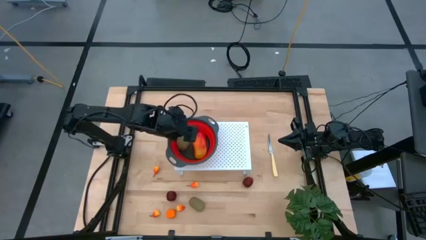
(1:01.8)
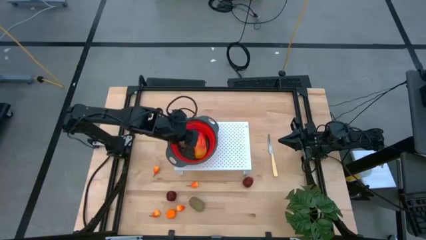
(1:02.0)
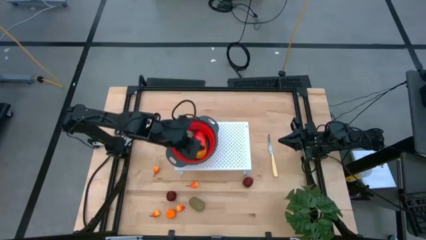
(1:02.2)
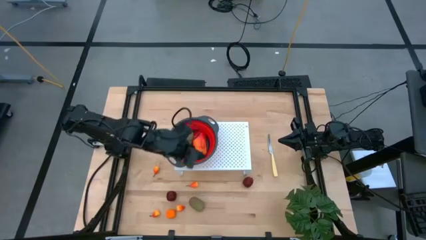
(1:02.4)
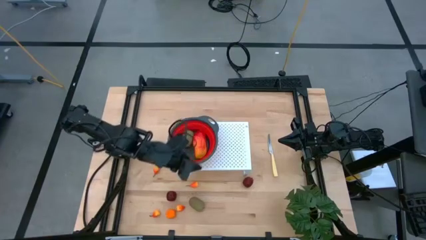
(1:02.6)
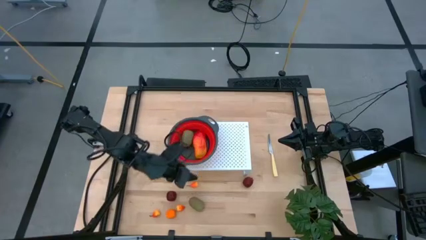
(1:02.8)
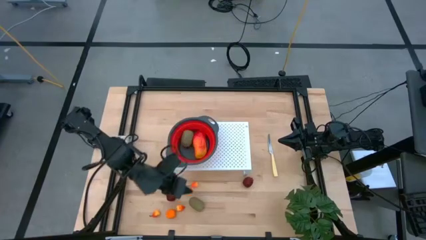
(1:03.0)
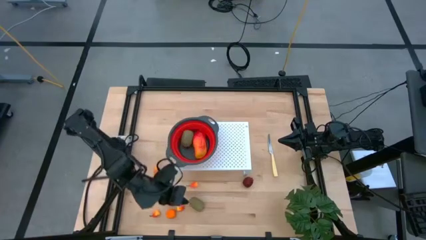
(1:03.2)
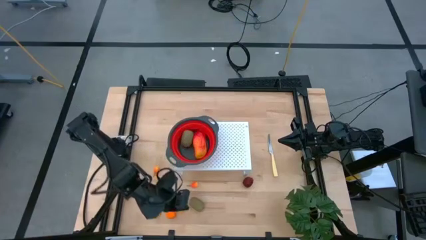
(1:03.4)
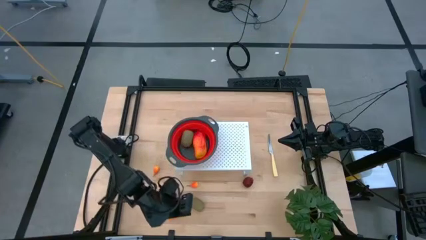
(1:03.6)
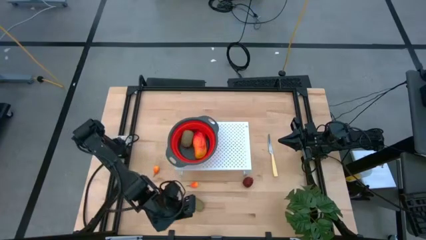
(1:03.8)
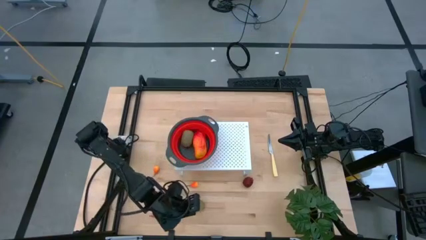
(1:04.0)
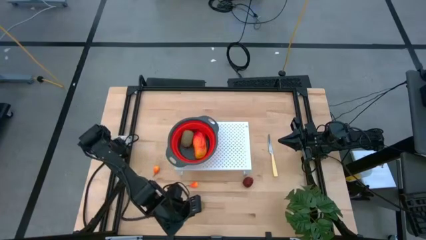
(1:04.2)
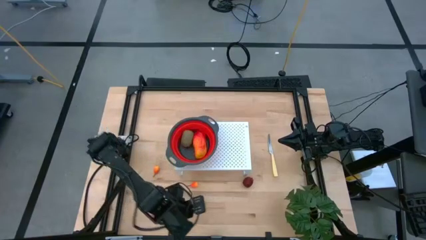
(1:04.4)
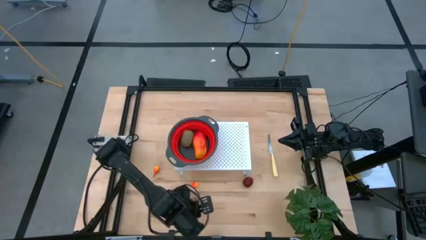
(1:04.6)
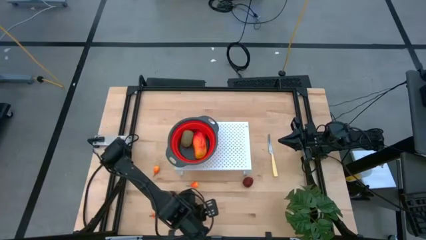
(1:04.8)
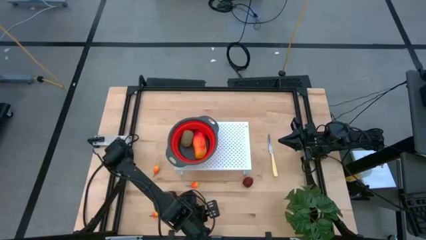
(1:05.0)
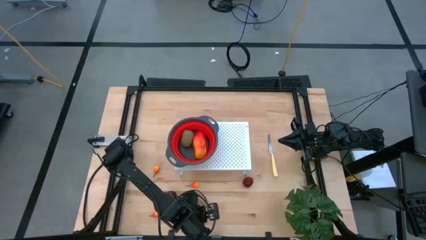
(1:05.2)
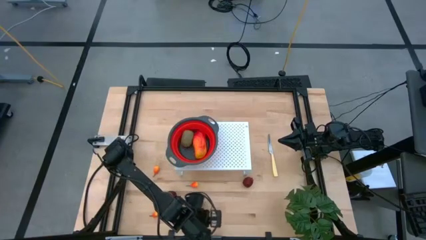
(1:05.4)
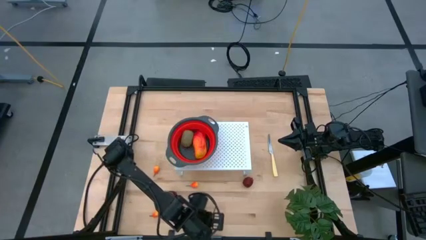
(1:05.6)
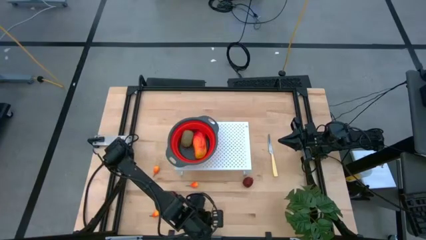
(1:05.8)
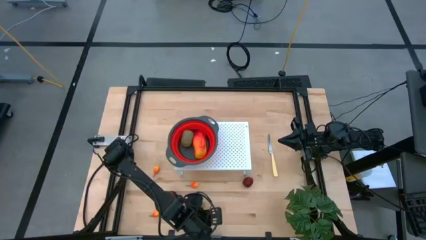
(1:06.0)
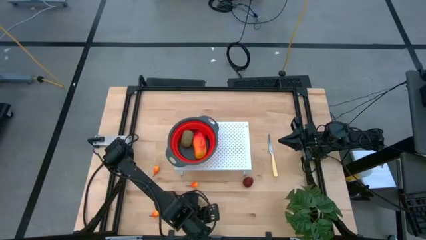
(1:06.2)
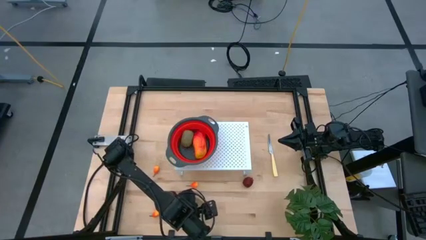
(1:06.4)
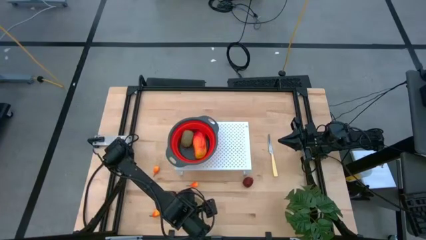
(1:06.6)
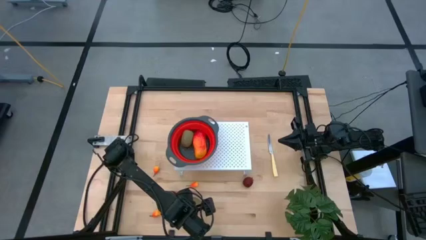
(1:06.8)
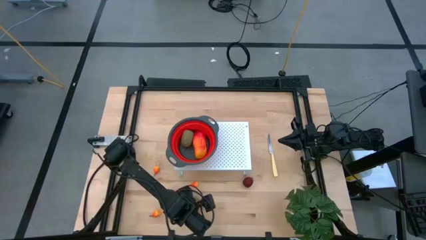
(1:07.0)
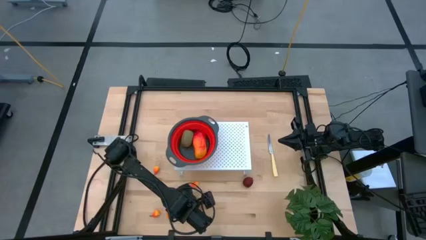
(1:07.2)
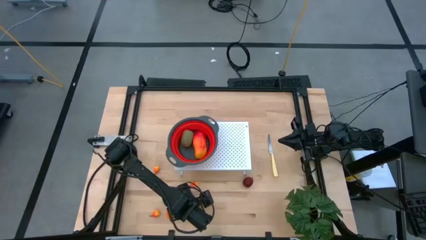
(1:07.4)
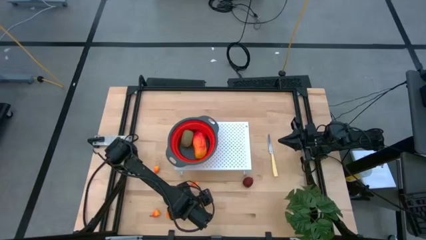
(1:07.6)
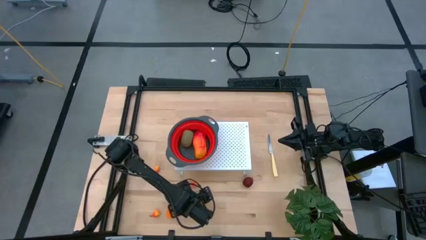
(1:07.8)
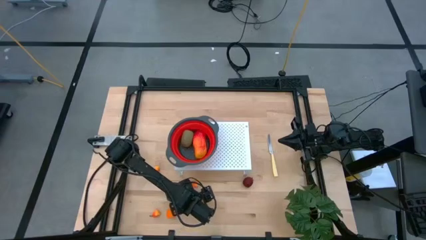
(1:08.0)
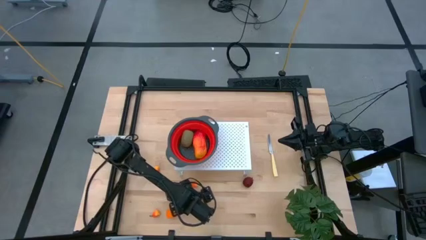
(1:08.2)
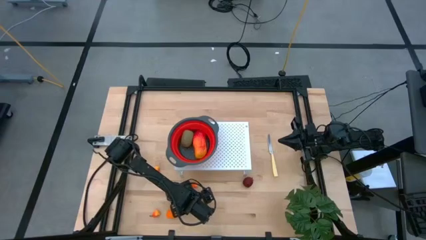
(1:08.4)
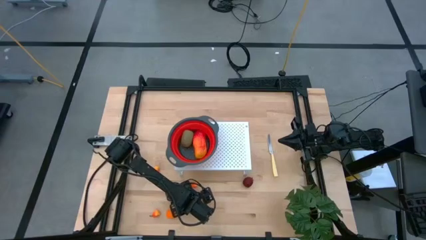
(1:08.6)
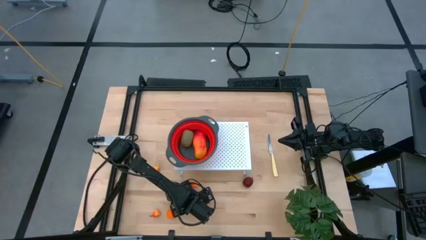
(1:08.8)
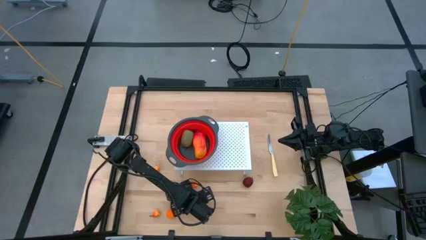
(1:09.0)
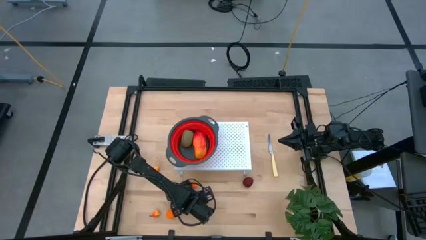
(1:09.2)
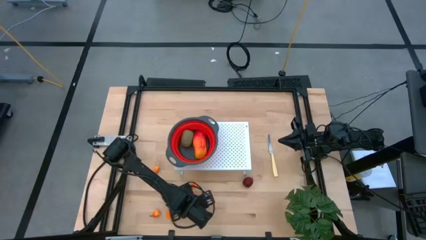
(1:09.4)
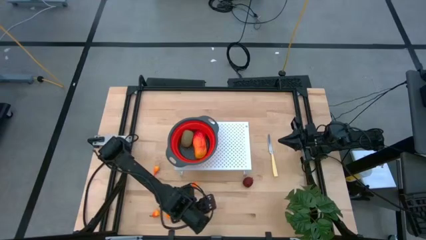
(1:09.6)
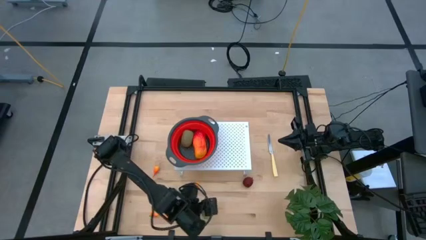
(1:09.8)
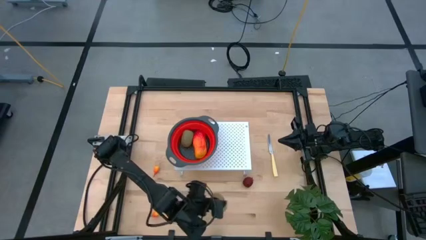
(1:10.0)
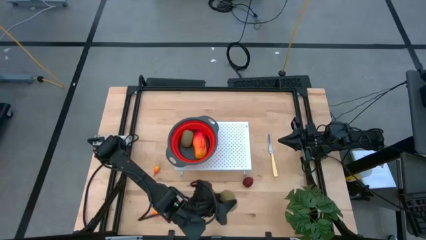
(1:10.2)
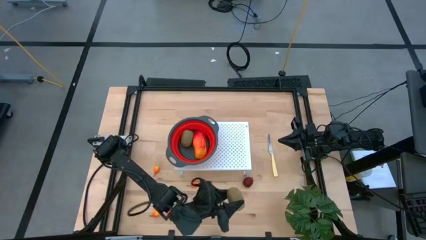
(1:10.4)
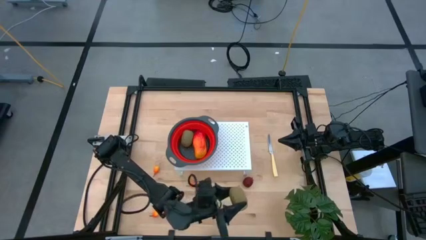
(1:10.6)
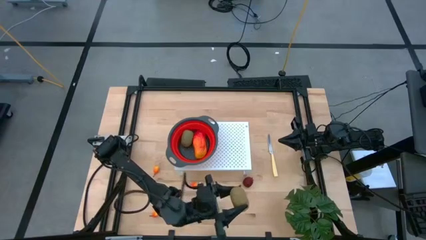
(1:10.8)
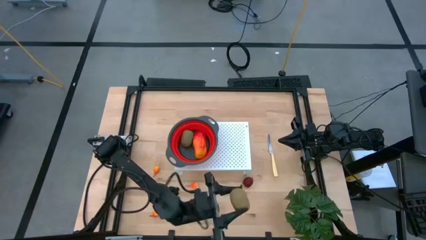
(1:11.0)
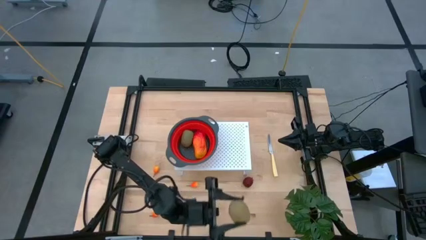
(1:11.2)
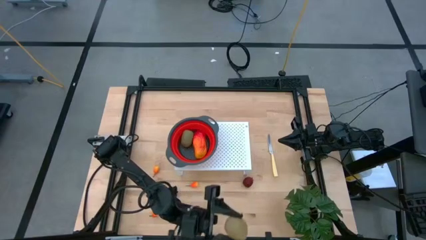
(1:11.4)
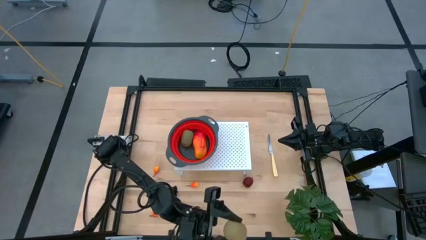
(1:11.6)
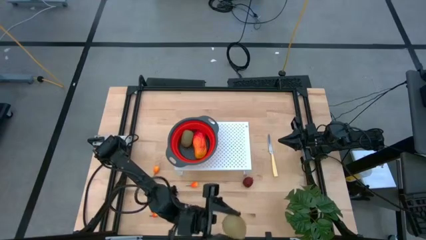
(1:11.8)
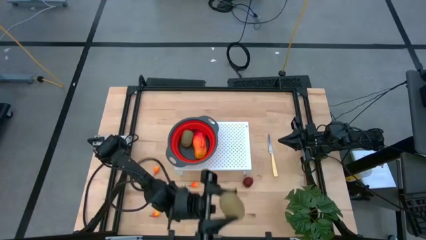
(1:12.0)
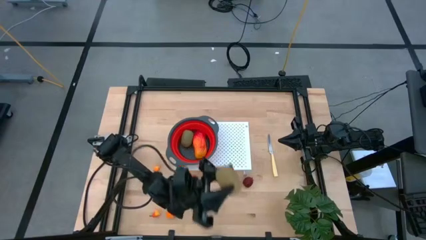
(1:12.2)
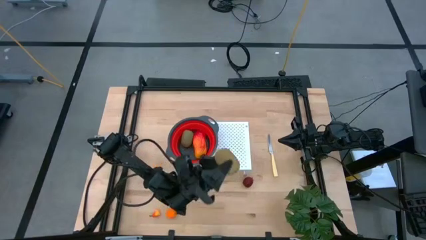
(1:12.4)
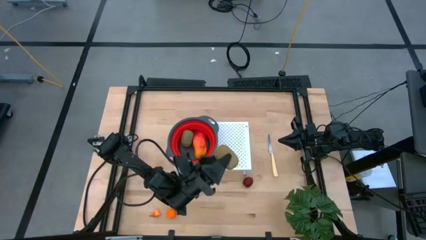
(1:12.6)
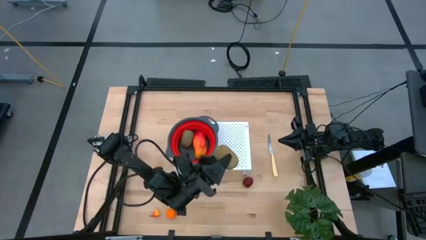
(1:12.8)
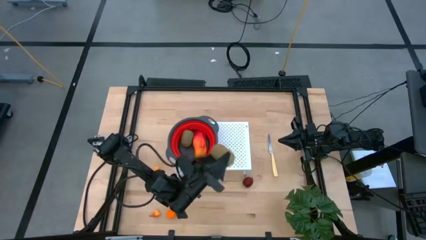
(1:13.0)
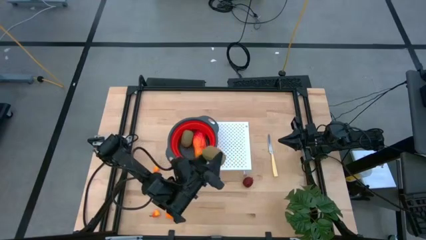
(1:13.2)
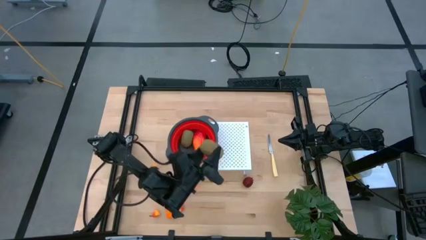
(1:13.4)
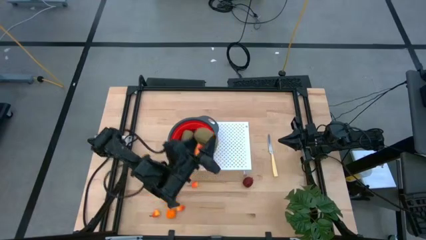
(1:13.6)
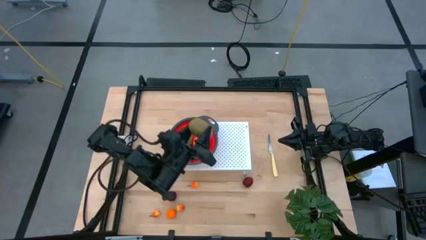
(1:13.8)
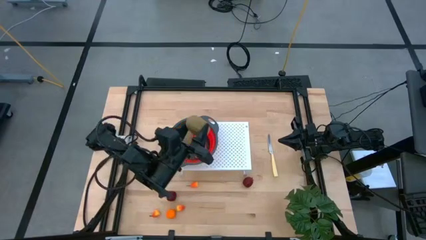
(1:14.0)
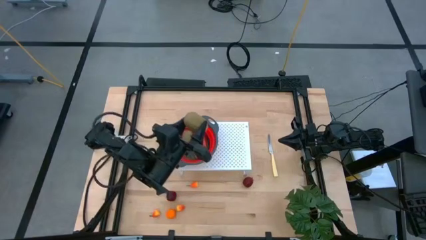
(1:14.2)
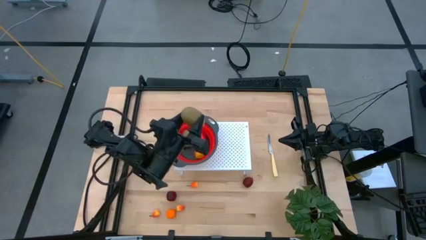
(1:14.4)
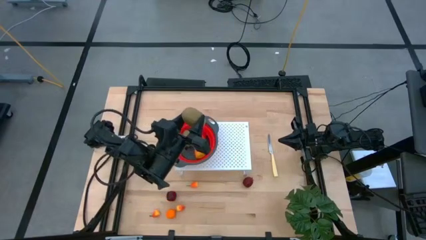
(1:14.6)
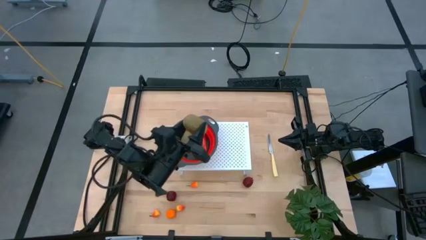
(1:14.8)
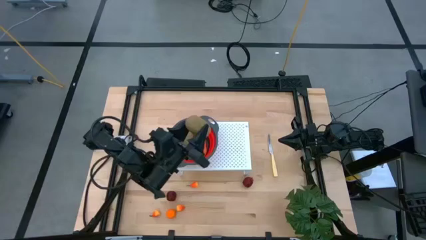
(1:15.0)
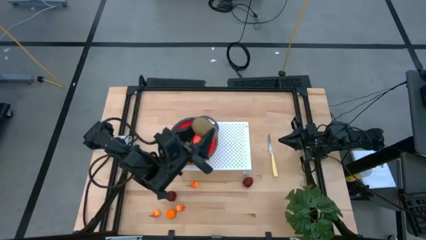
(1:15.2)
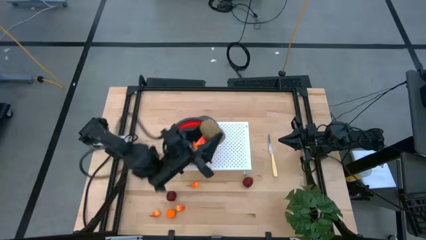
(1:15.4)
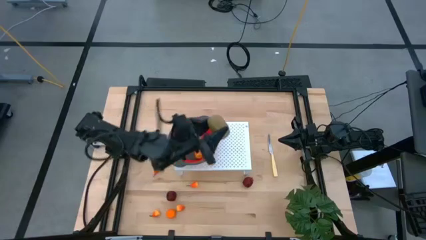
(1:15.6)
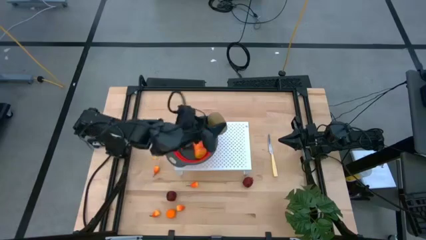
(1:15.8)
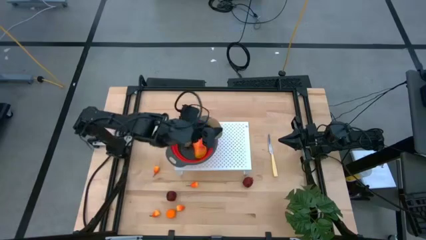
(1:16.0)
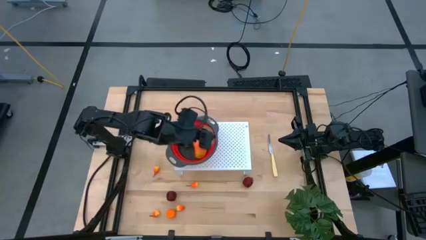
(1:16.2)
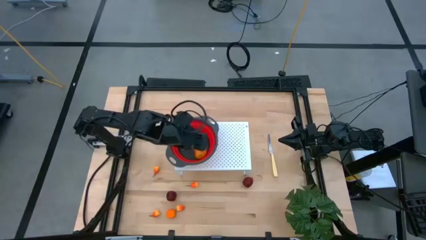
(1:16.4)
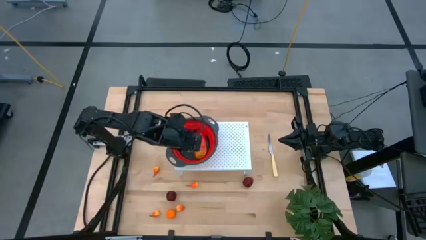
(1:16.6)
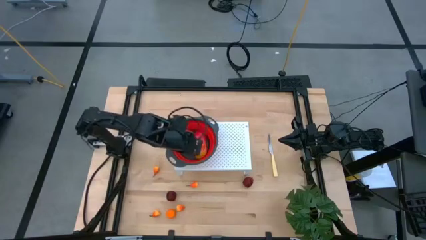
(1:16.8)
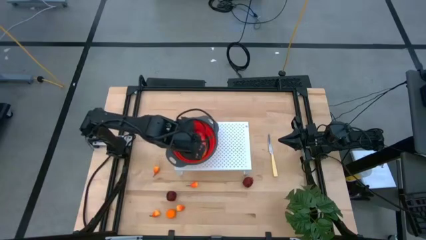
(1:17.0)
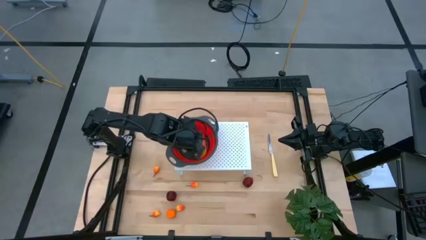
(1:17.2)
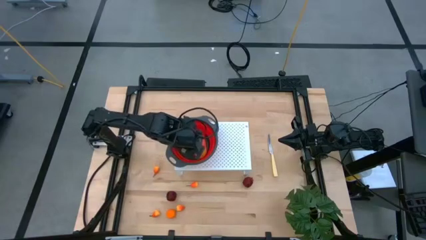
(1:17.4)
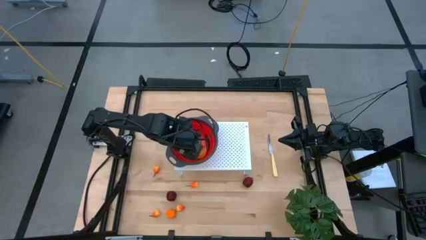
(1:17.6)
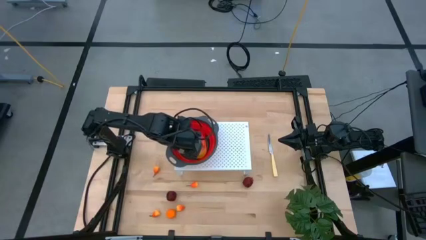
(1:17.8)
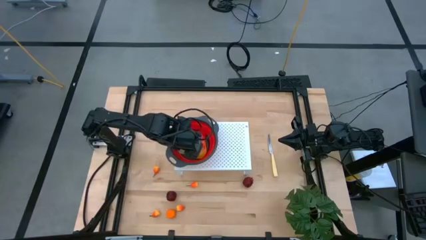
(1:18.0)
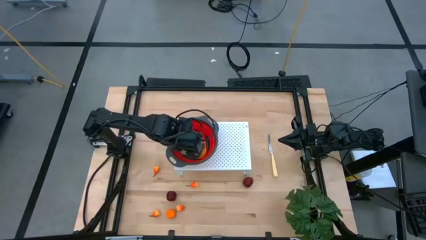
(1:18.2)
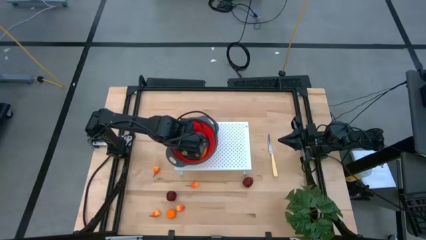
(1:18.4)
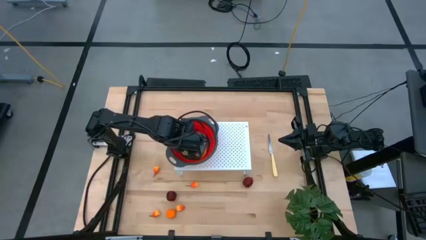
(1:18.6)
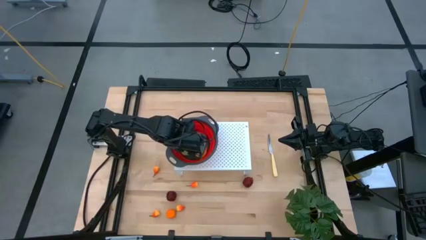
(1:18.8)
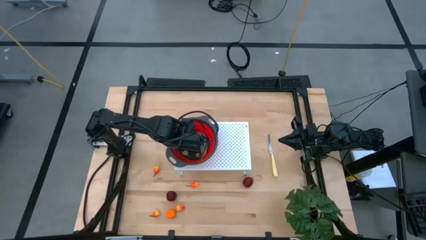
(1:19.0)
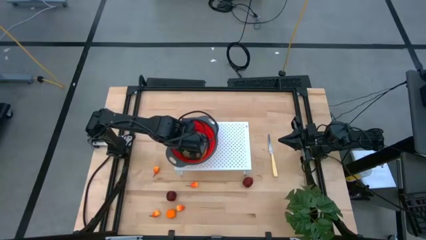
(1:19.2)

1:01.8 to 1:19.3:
Task: Pick & Place Fruit
Put the brown kiwi into the red strainer bowl on the shelf
